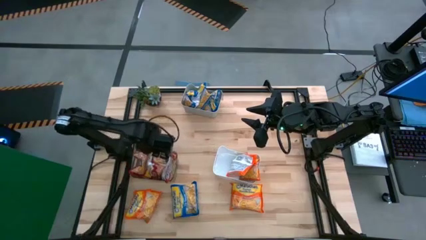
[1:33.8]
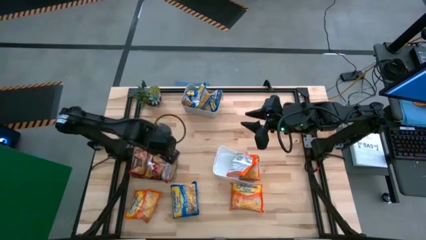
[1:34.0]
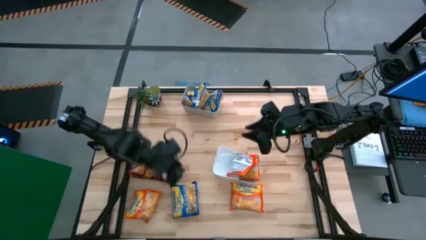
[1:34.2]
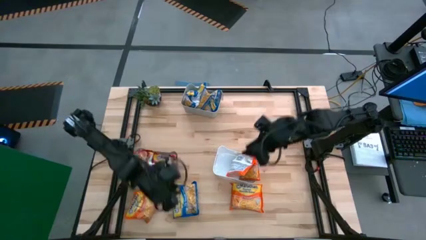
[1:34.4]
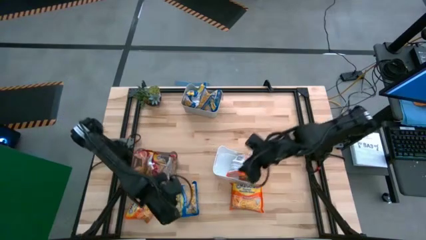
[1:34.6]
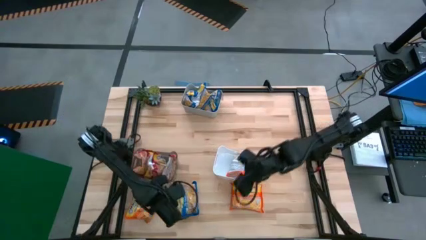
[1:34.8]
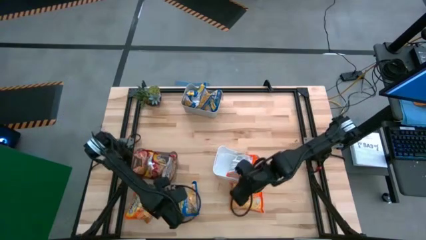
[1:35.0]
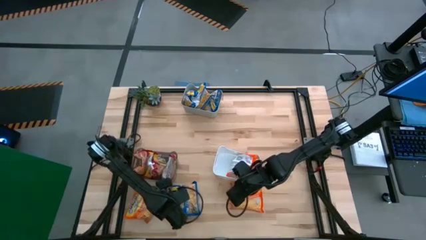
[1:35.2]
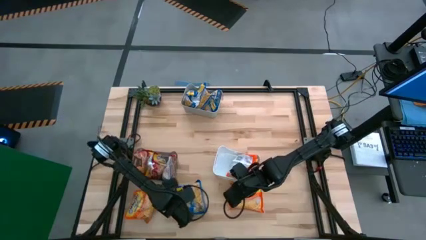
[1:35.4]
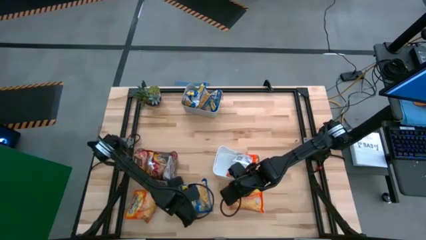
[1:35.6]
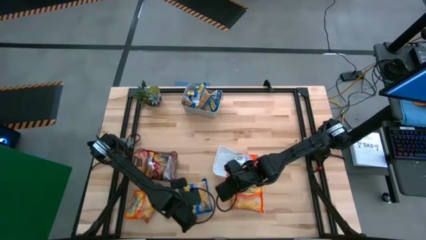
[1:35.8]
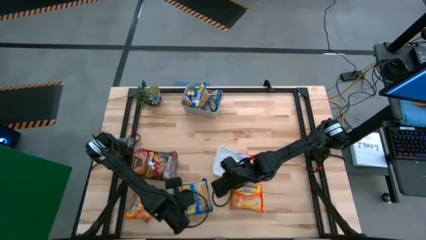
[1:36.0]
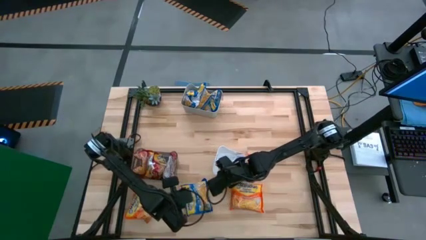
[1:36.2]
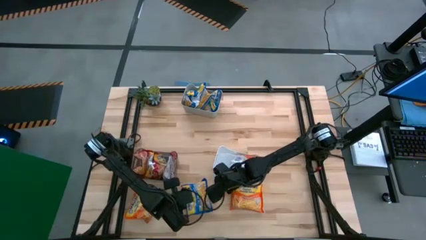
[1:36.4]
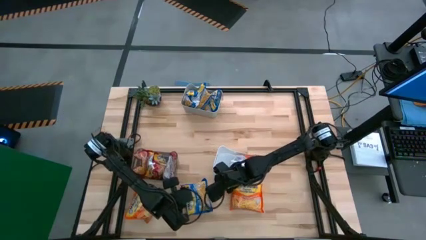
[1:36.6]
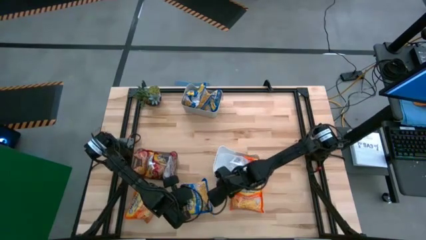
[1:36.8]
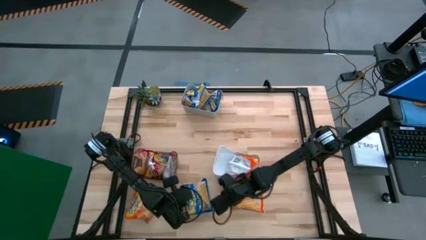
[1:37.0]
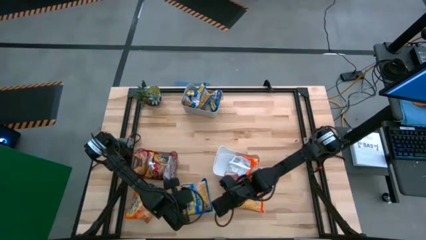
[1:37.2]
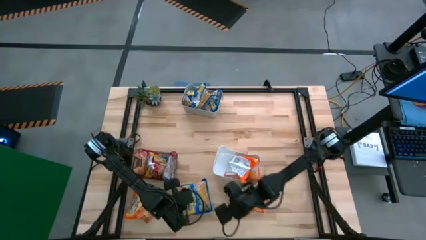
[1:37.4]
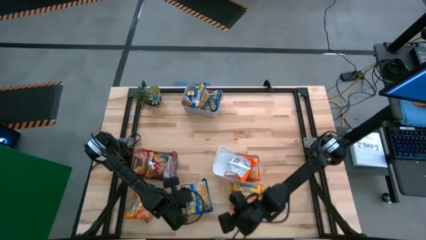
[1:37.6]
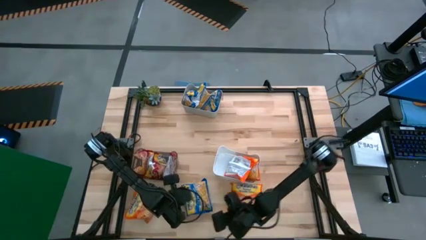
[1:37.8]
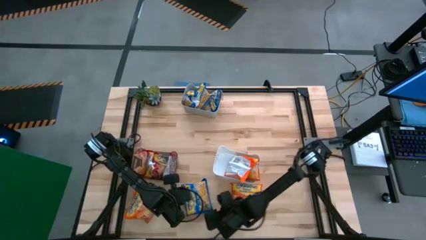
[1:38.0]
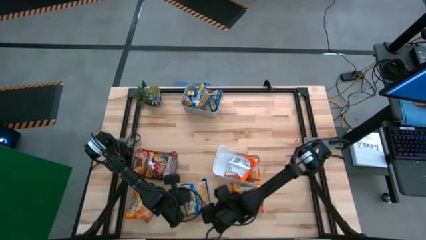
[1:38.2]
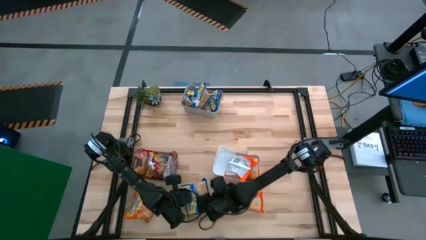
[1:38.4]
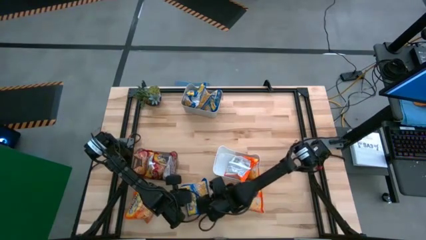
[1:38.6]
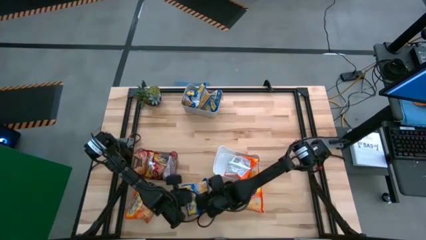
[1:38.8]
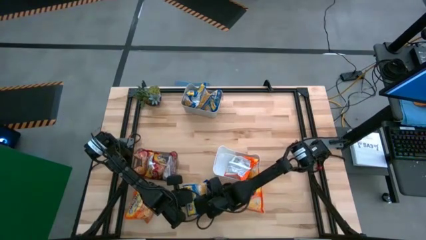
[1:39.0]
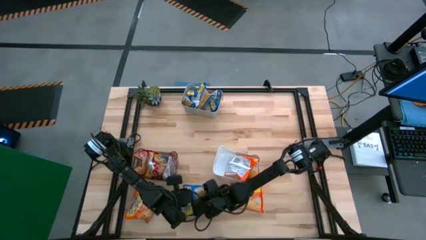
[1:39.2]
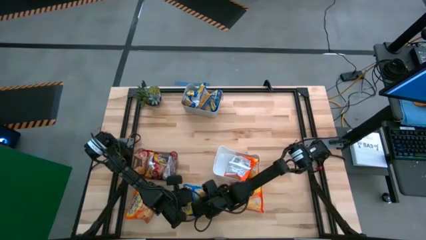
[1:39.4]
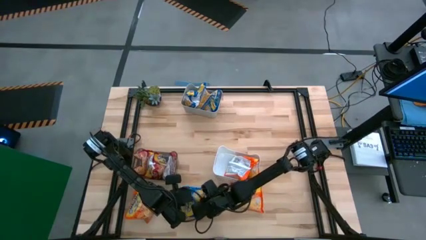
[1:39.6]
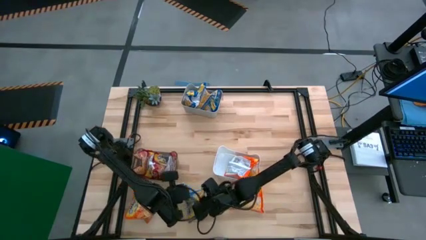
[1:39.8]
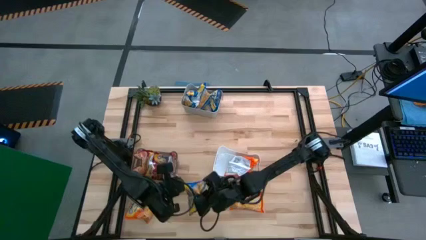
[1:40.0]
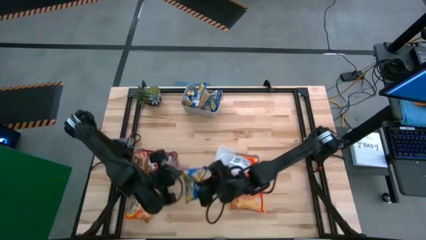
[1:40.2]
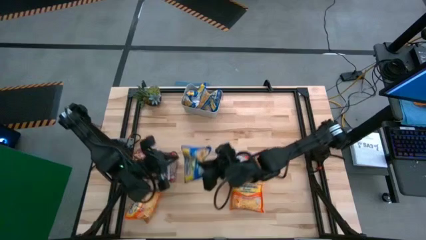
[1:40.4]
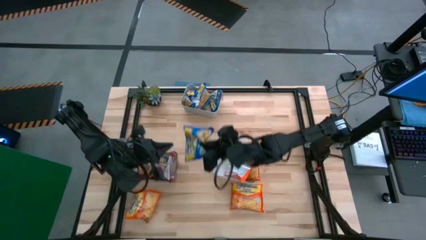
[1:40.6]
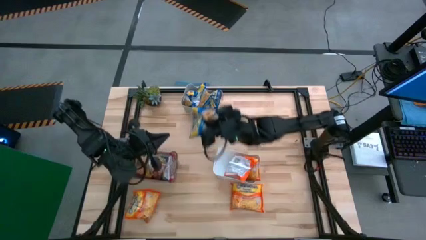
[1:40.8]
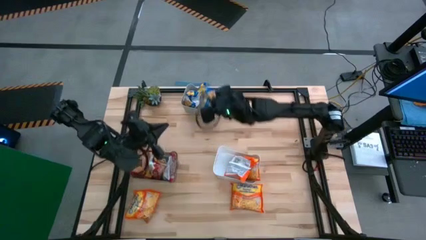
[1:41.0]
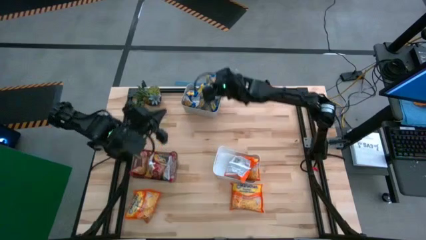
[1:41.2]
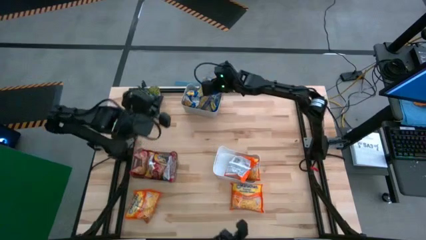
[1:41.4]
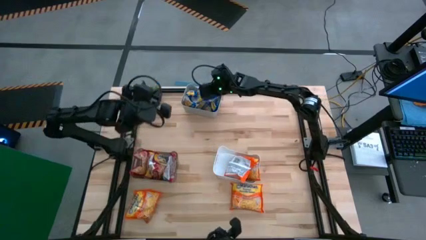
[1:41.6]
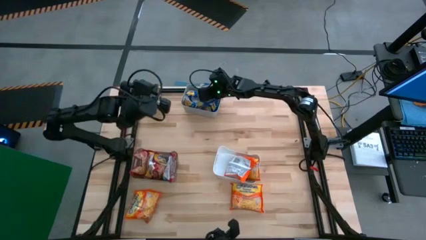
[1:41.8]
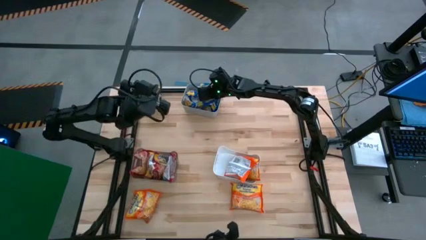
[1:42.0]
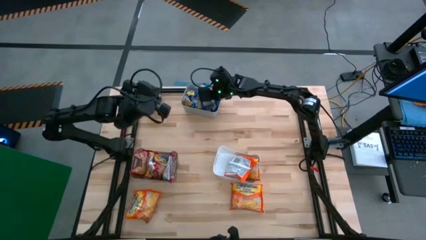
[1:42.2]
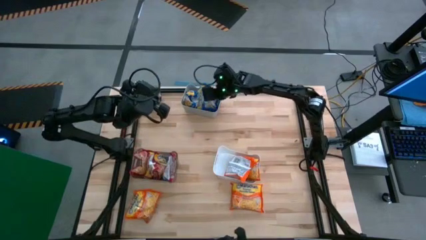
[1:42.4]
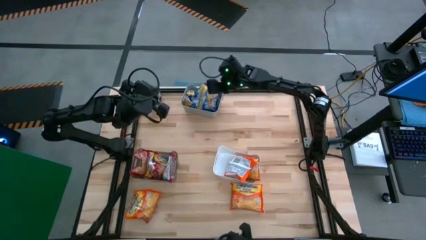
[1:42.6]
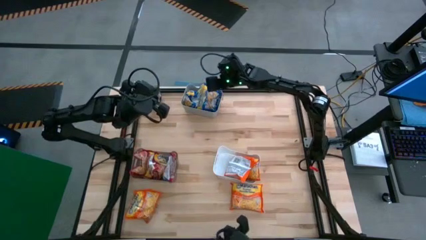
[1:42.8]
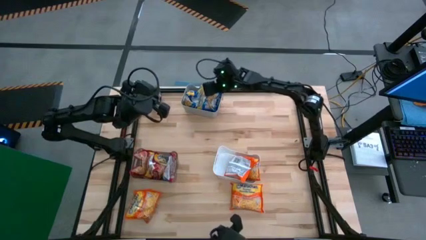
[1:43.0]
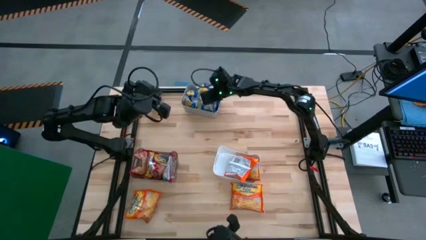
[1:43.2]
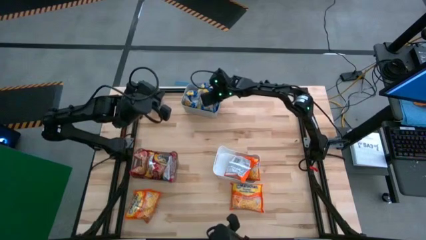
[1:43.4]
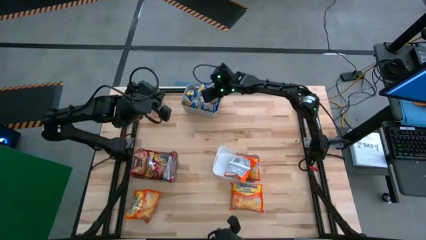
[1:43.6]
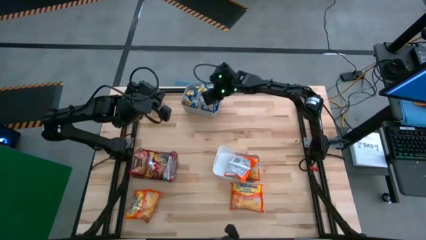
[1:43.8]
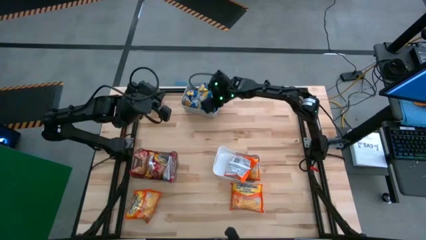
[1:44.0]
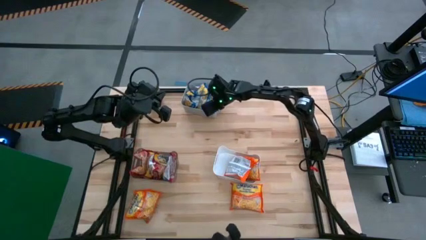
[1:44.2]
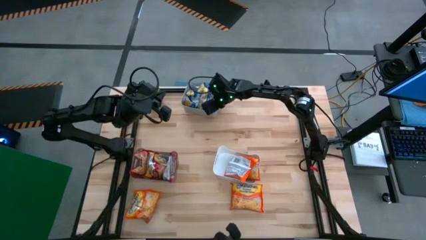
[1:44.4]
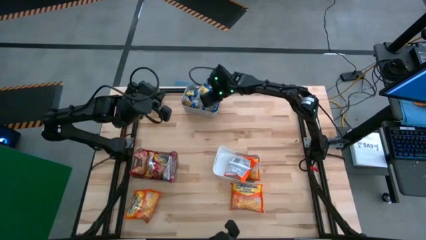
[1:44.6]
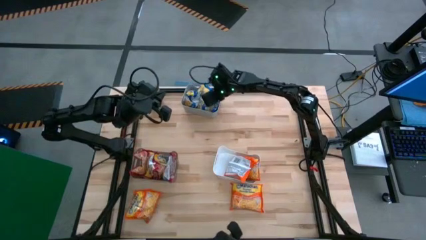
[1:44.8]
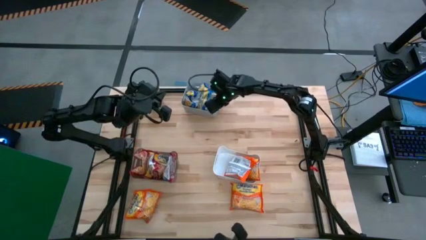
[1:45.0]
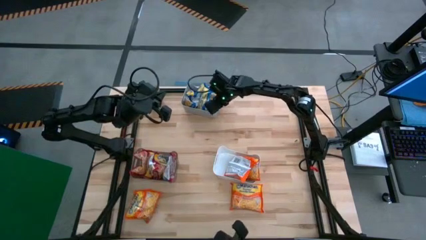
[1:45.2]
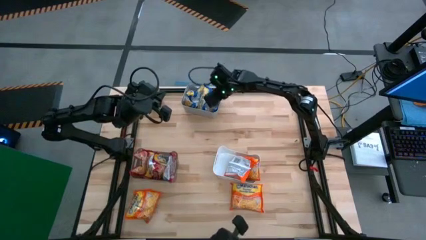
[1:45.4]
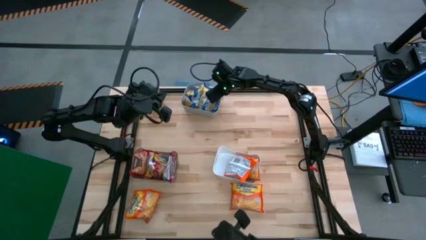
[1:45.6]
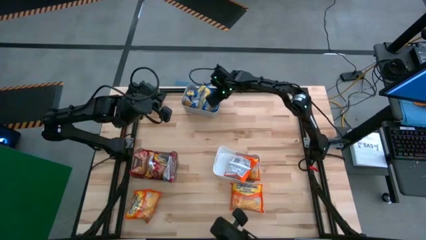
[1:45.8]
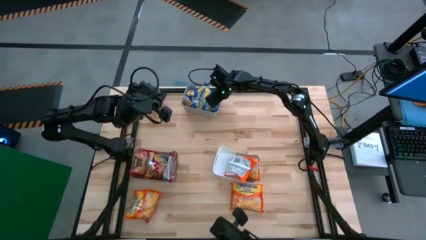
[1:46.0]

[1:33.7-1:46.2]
Task: Sort Maruchan noodles
Put the blue noodle pack into the gray bin
